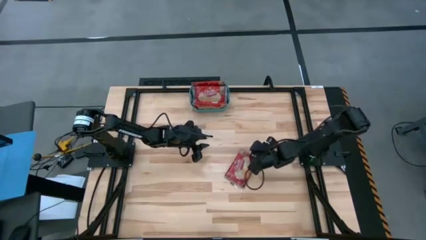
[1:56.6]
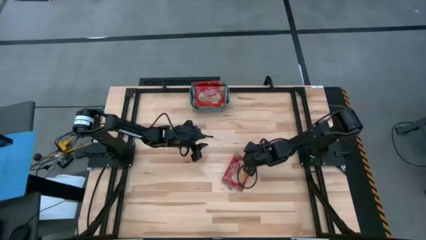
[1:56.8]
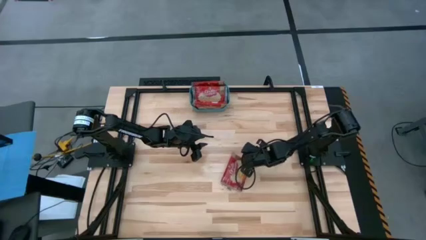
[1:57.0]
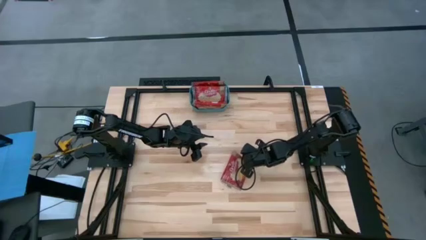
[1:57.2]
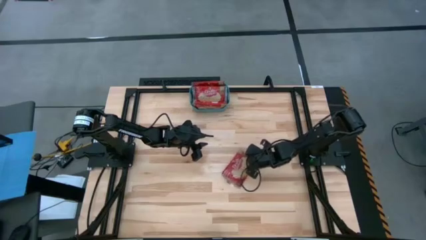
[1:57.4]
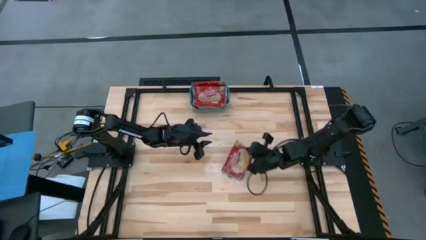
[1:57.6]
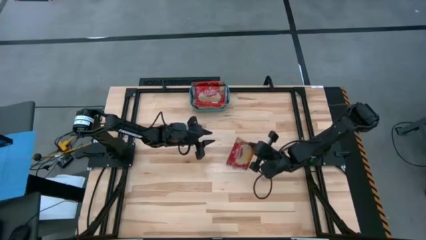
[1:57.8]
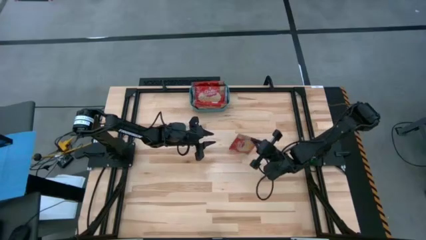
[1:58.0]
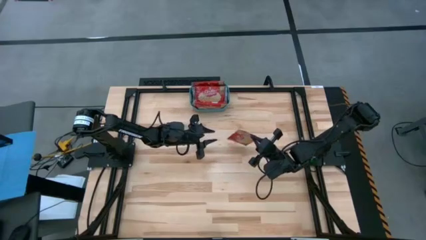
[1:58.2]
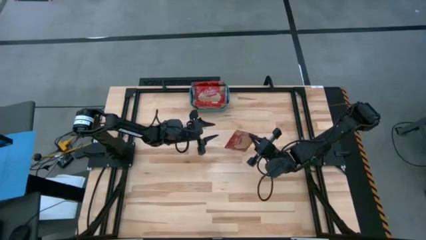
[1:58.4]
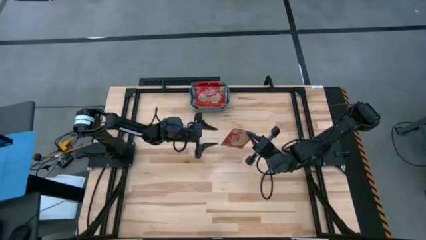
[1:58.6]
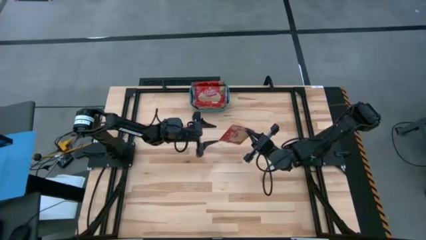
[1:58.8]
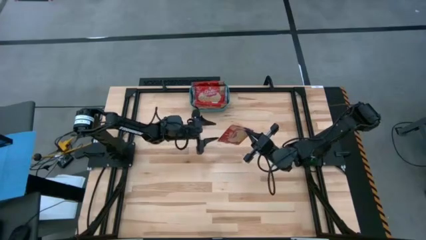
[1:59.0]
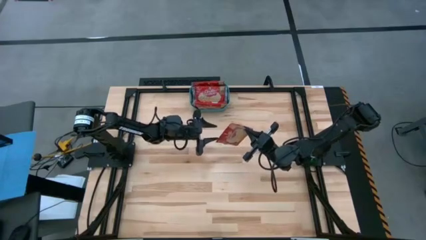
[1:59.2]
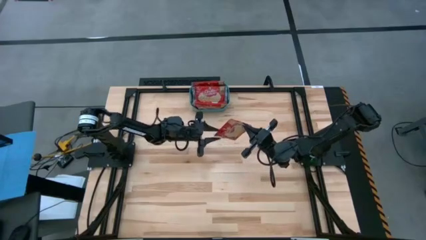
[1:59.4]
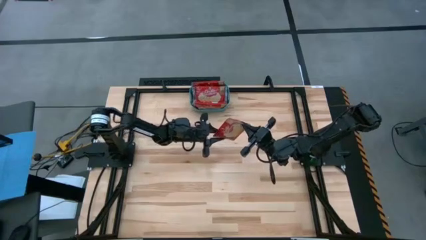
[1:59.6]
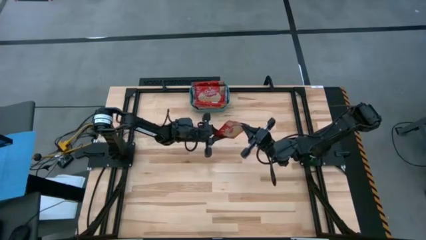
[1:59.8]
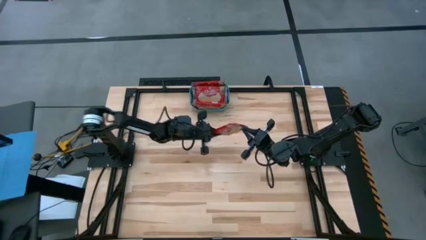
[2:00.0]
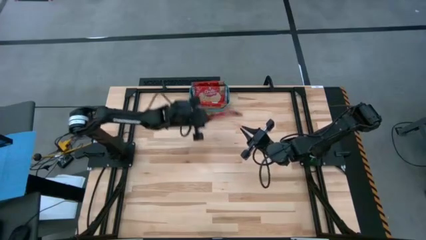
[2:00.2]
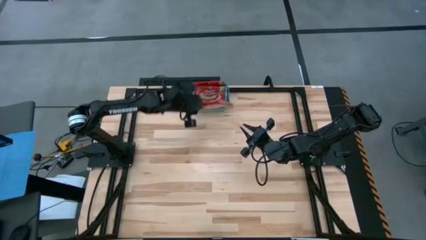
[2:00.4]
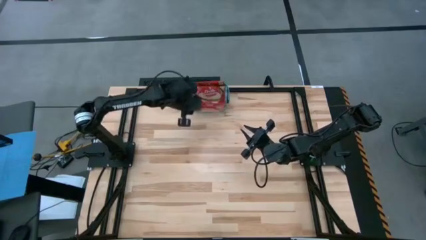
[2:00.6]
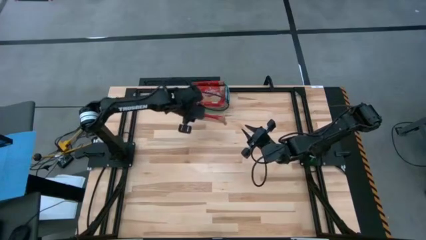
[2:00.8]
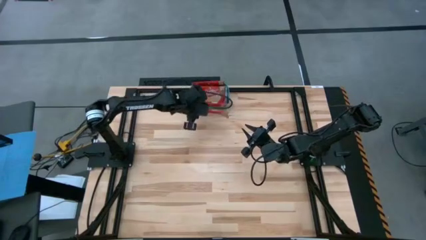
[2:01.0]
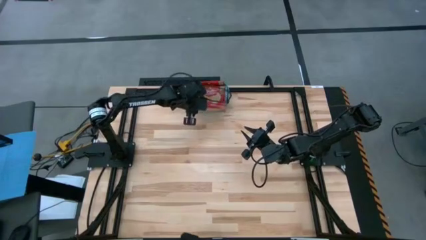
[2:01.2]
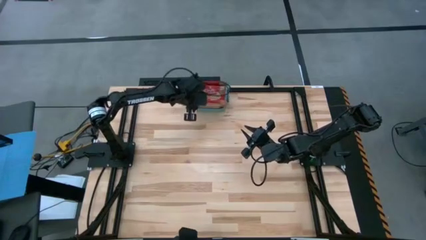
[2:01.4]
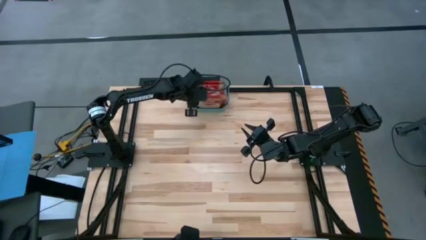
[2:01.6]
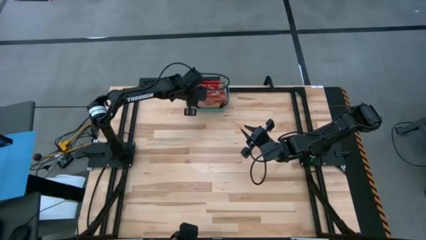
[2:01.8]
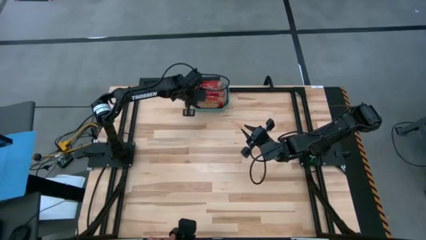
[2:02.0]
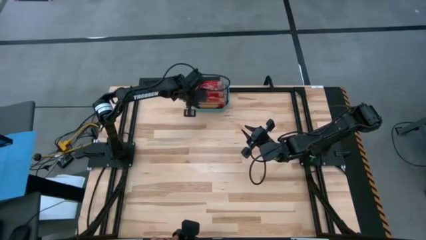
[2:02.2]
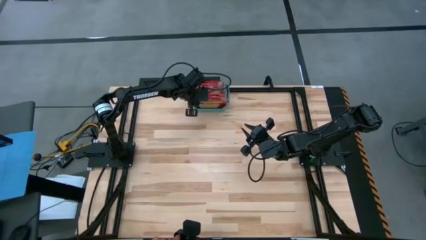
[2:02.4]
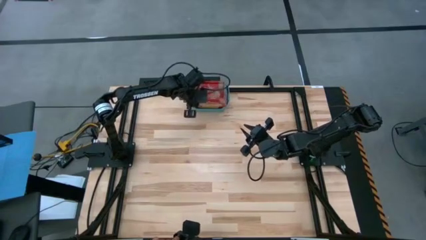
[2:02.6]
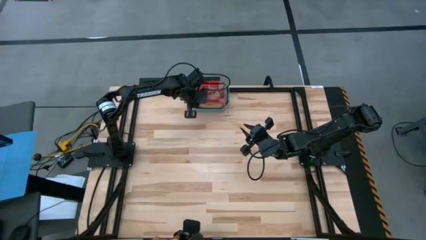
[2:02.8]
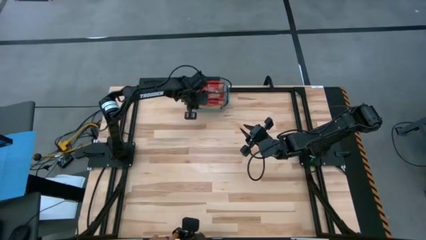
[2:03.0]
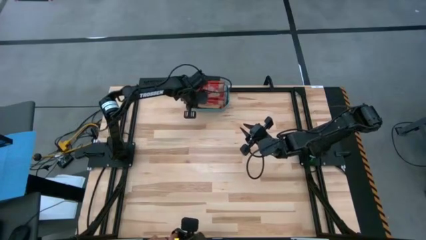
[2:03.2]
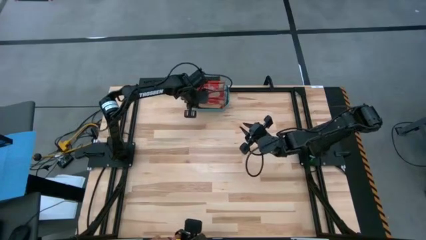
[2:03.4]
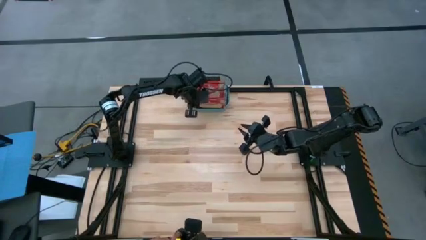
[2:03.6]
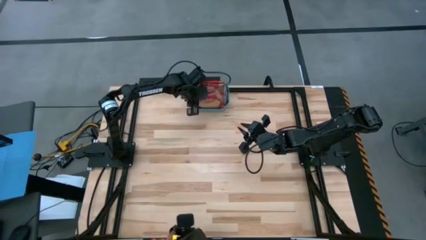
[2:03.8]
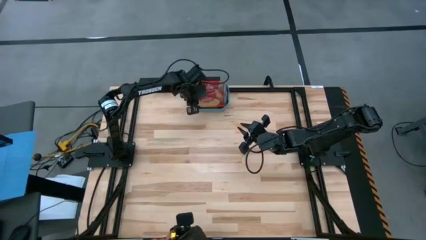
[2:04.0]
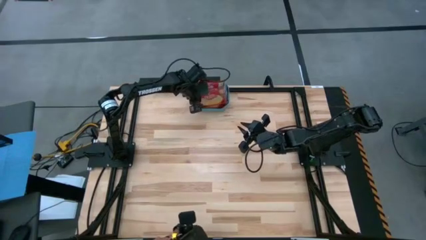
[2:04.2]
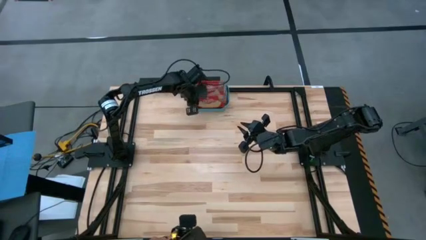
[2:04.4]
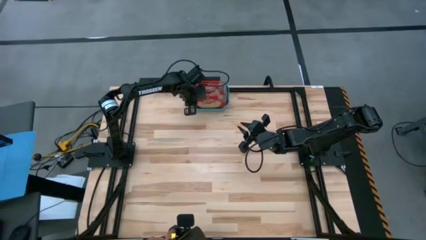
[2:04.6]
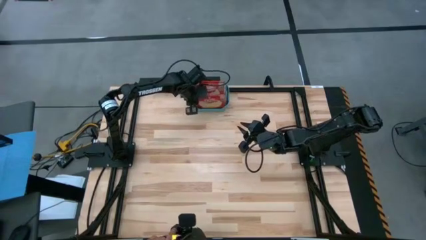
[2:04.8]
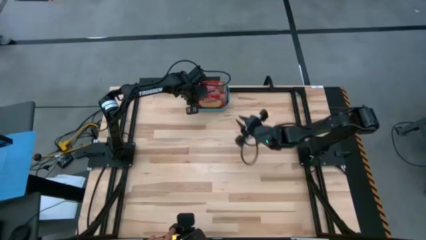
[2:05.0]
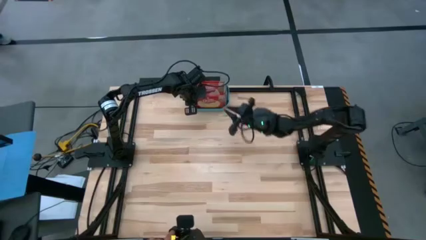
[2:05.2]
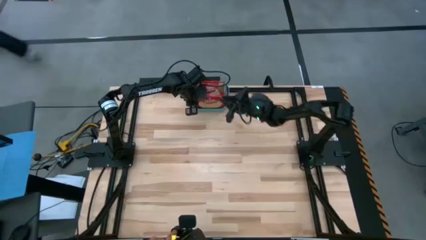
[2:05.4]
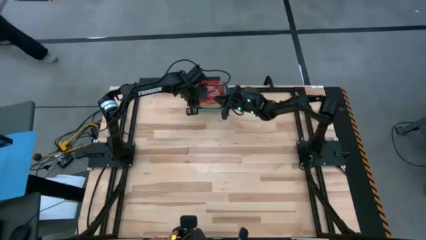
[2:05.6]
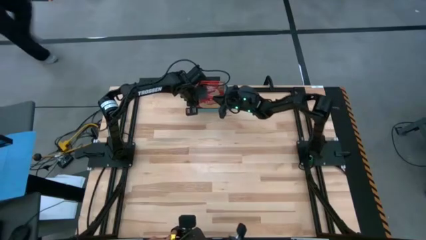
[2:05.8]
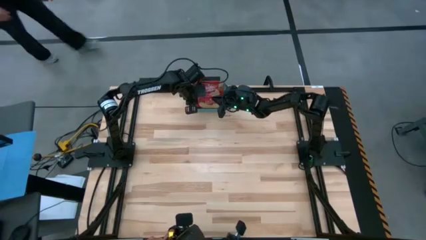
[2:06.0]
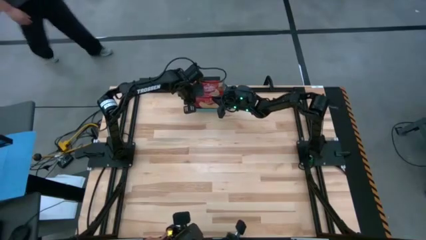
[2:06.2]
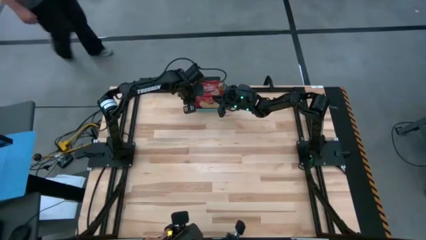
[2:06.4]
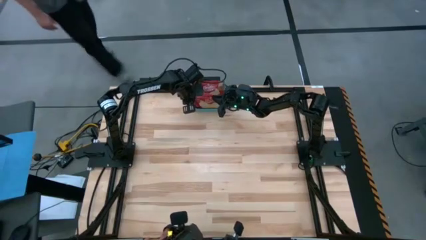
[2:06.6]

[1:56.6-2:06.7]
Task: Sort popcorn bags into baskets
Put the red popcorn bag into the green basket

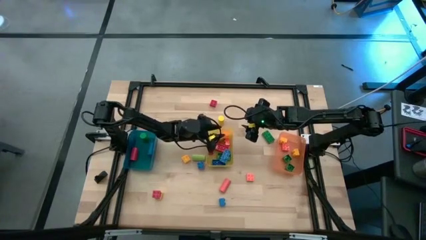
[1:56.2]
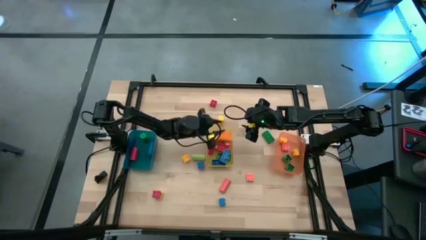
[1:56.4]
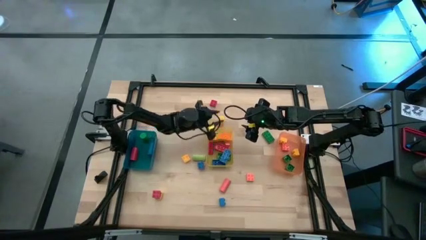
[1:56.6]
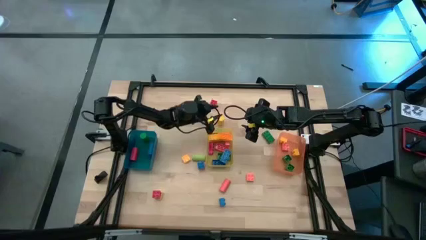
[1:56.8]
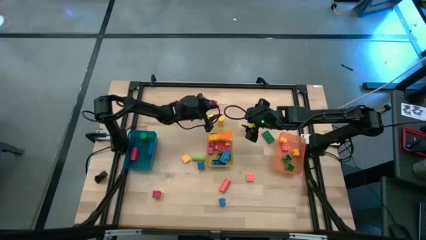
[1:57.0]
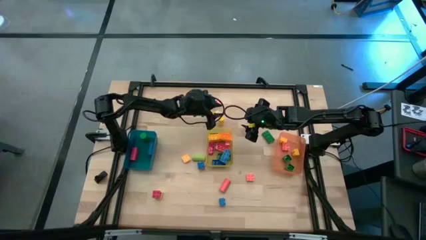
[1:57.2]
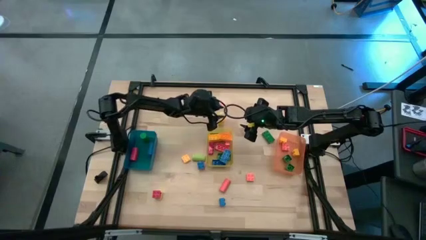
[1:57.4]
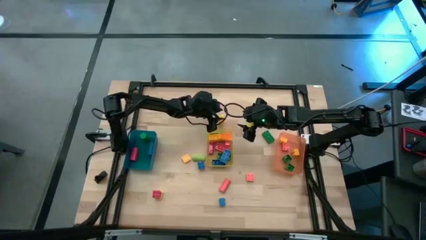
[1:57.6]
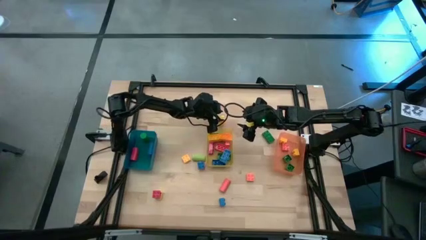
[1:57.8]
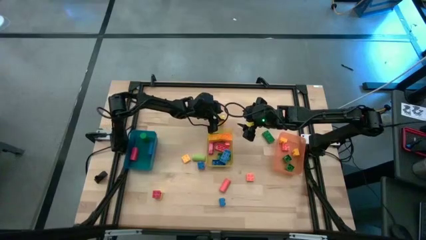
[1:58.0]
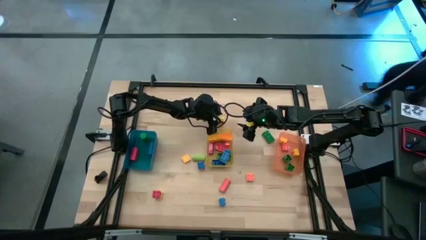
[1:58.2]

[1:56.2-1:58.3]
Task: Sort blocks by size
Put the yellow cylindrical block into the blue bin

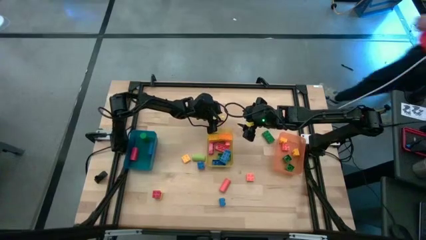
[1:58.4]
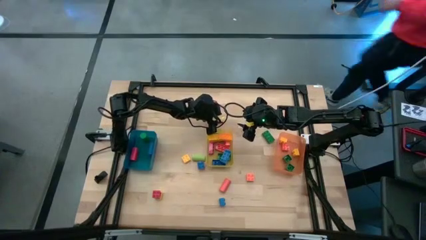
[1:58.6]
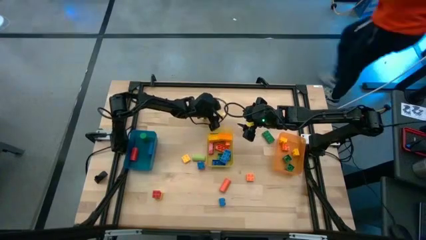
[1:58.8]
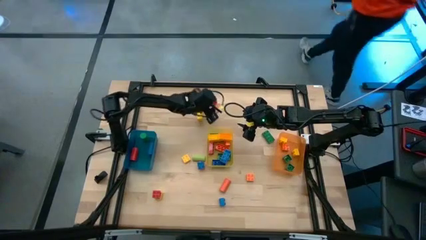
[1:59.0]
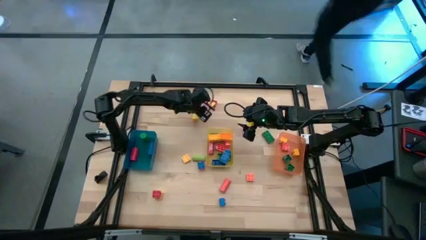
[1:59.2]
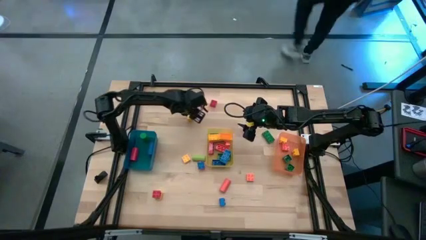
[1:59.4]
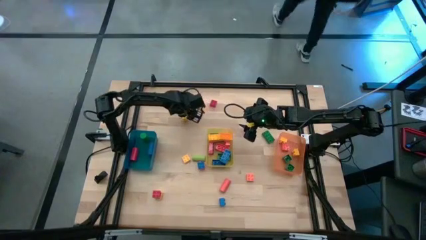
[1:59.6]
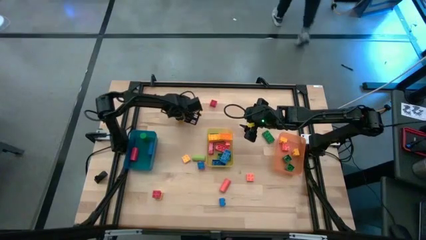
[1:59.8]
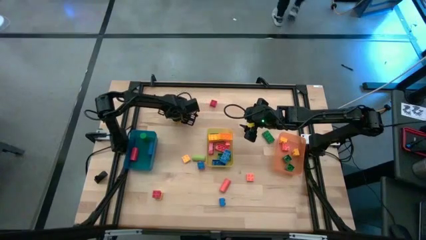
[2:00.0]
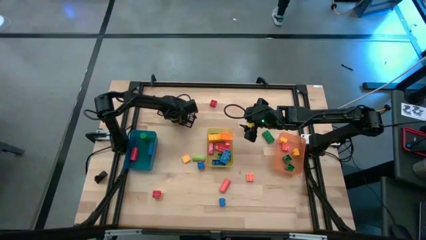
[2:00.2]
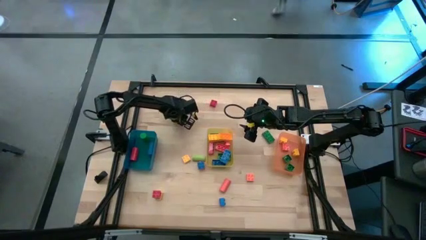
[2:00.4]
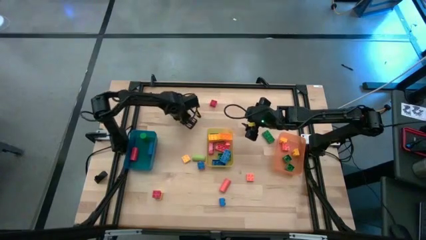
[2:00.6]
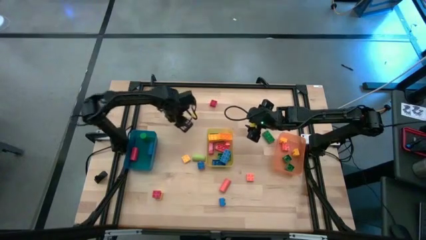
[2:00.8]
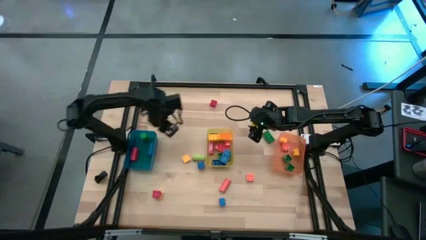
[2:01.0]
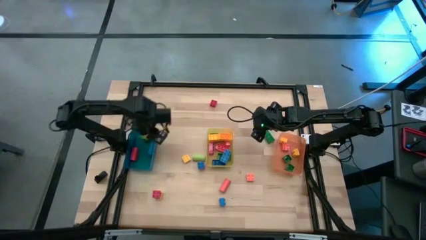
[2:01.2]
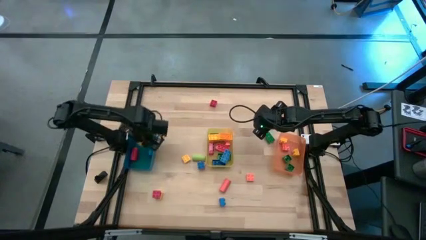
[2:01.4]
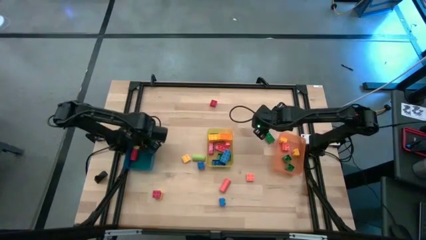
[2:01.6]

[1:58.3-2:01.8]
Put the yellow cylindrical block into the blue bin

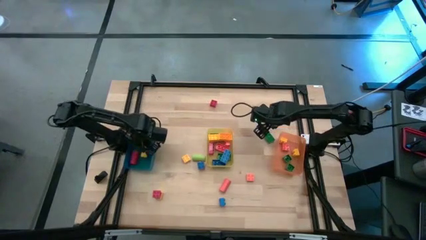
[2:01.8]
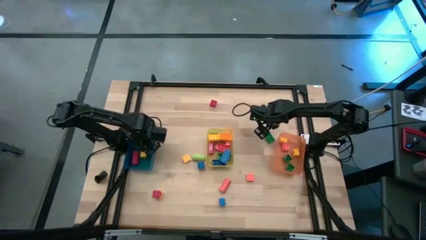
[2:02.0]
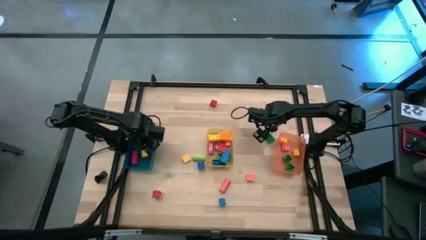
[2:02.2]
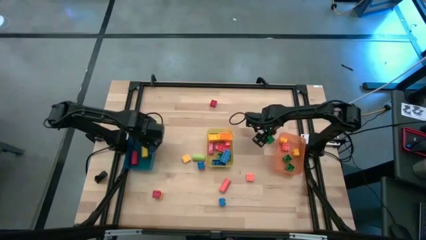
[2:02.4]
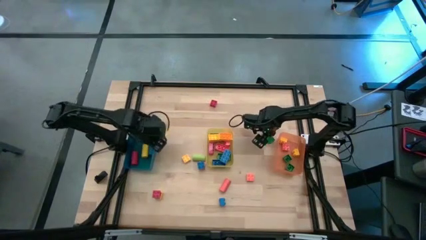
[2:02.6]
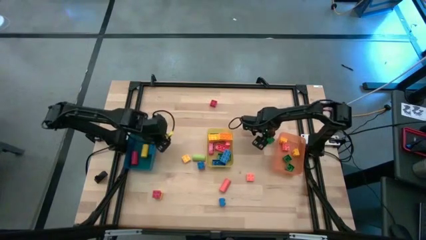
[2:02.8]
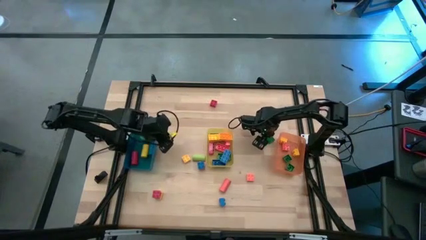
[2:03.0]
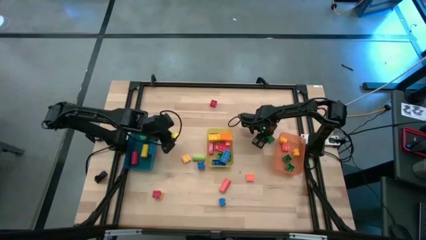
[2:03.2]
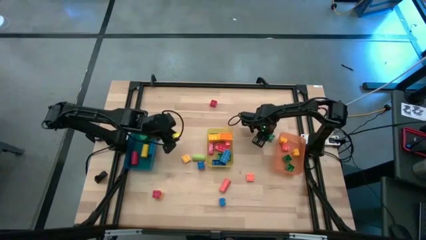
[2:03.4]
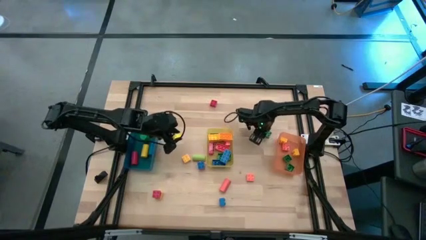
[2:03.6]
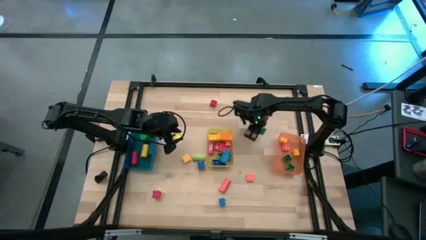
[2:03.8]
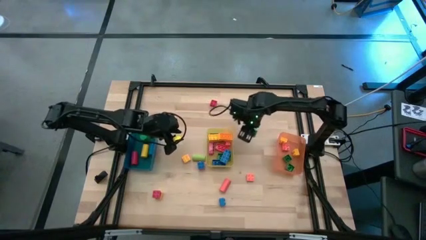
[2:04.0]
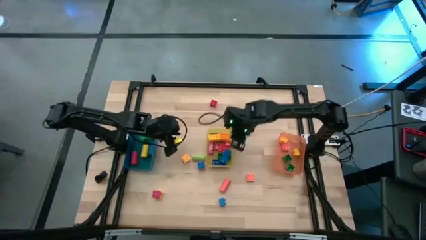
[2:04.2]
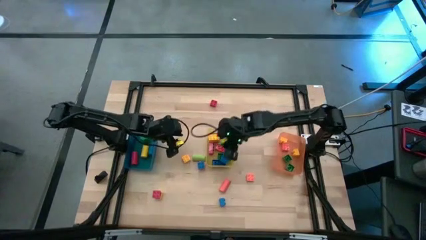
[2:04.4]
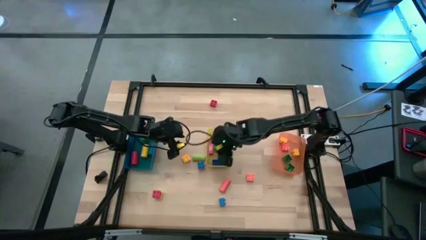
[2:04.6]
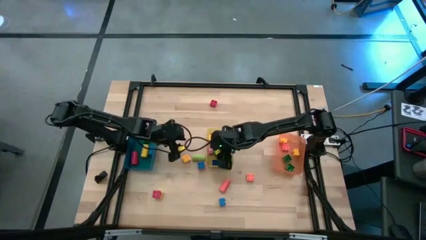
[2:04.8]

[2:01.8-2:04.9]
Put the green 8 stud game piece into the yellow bin
